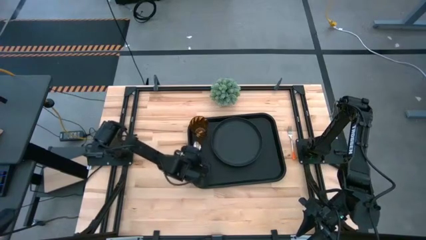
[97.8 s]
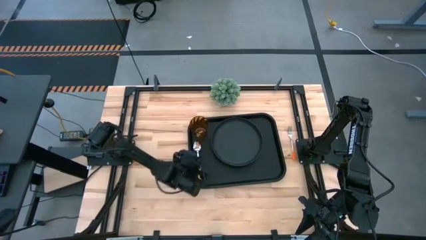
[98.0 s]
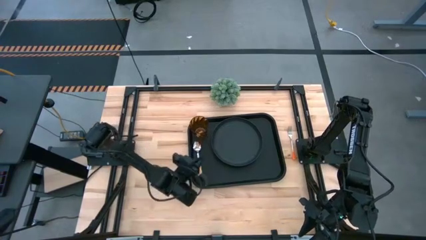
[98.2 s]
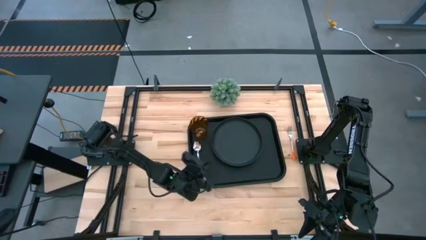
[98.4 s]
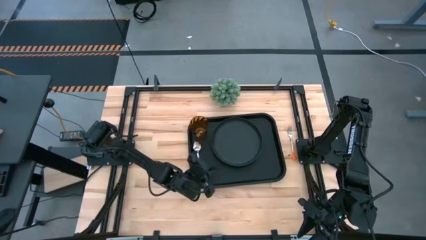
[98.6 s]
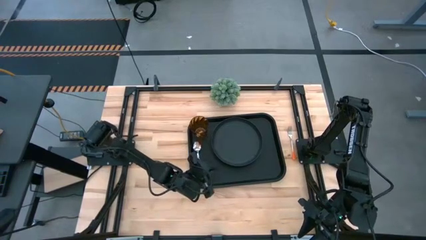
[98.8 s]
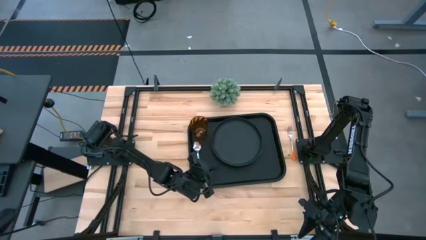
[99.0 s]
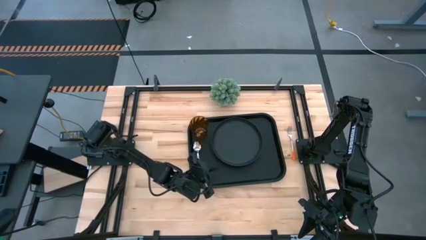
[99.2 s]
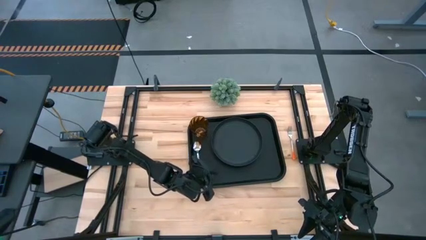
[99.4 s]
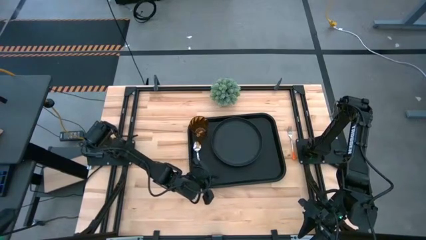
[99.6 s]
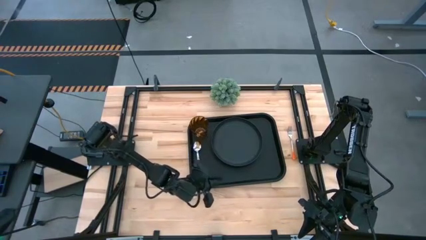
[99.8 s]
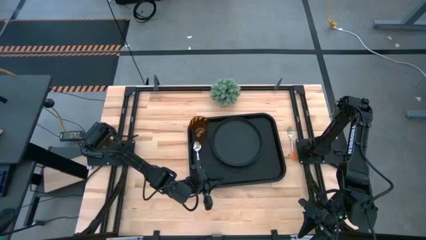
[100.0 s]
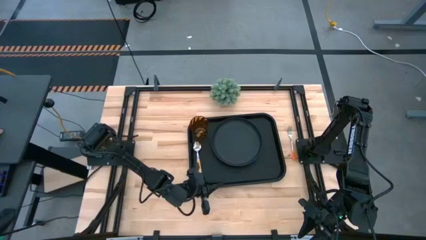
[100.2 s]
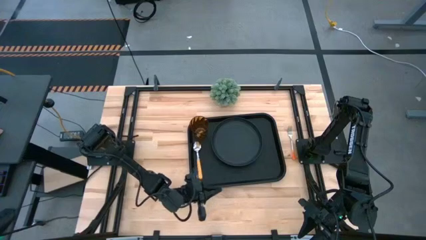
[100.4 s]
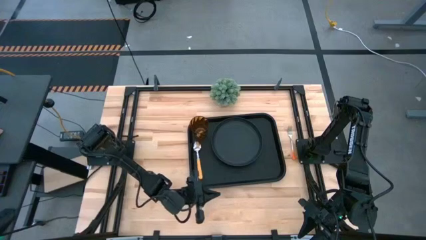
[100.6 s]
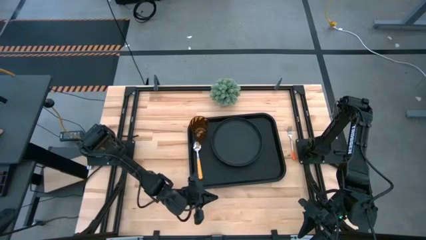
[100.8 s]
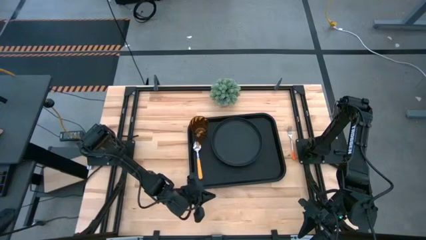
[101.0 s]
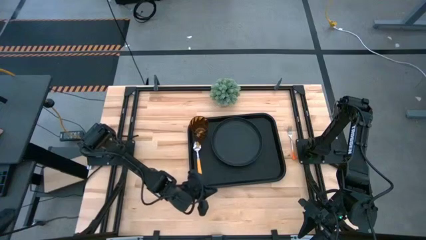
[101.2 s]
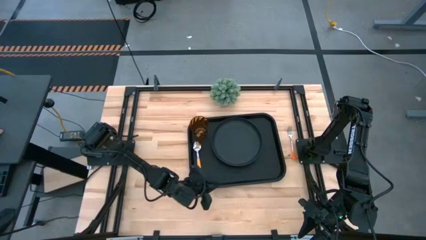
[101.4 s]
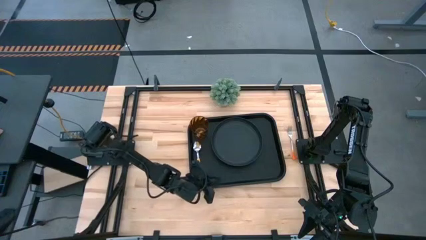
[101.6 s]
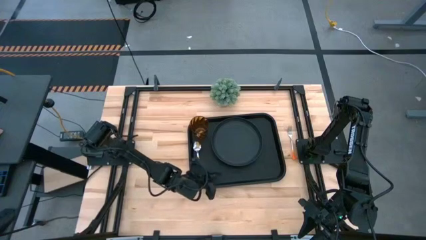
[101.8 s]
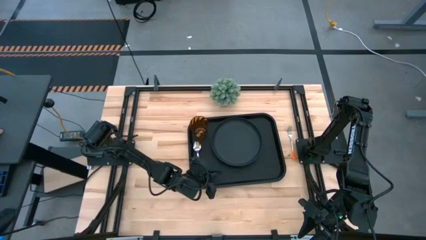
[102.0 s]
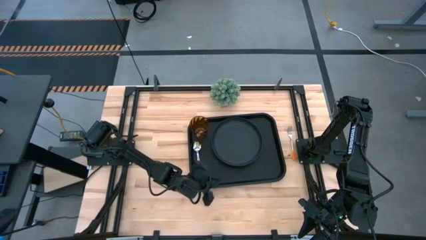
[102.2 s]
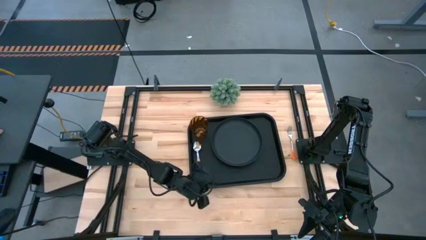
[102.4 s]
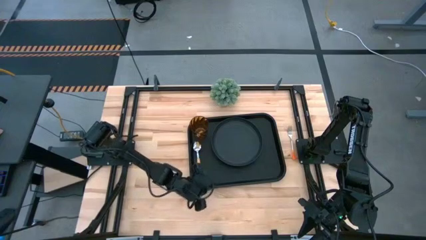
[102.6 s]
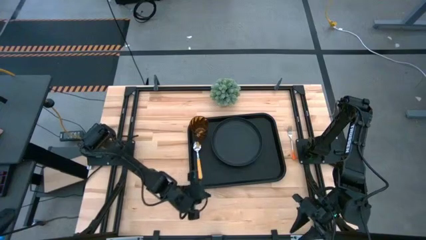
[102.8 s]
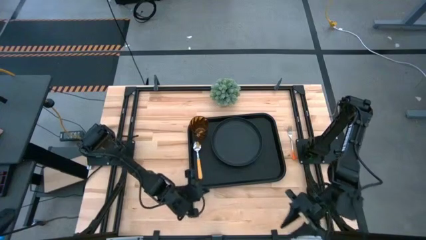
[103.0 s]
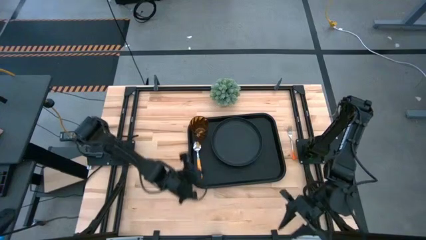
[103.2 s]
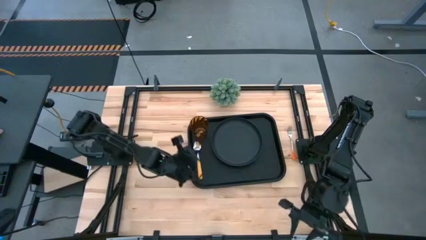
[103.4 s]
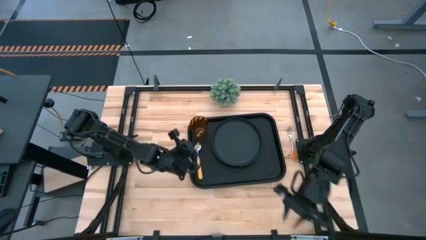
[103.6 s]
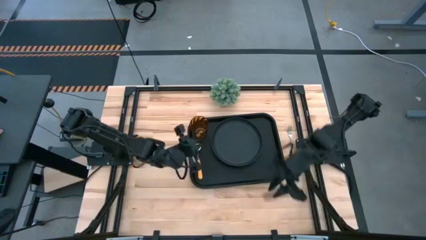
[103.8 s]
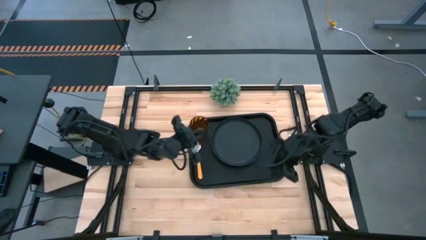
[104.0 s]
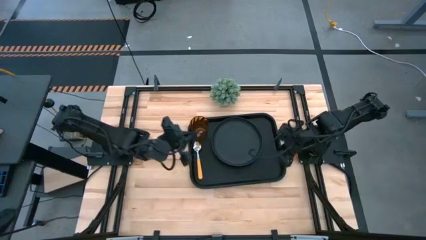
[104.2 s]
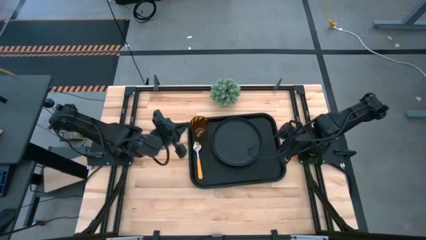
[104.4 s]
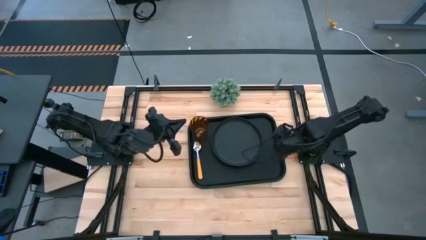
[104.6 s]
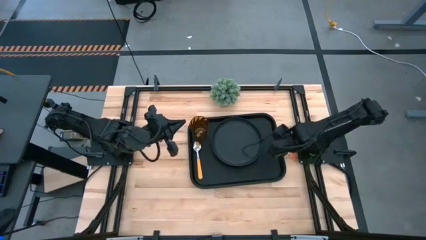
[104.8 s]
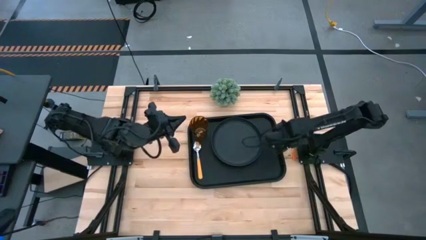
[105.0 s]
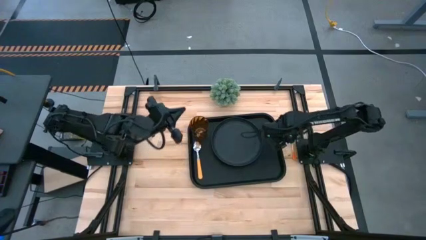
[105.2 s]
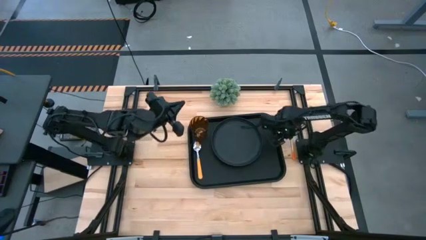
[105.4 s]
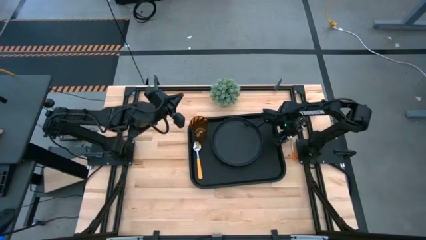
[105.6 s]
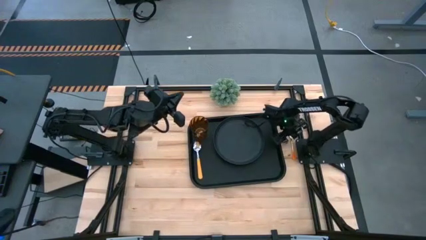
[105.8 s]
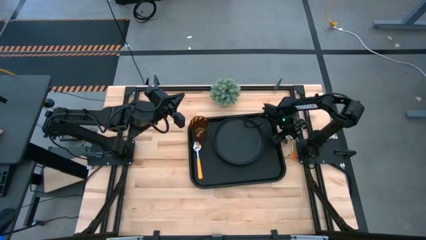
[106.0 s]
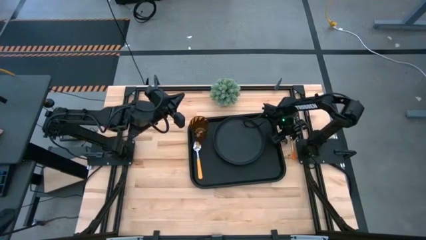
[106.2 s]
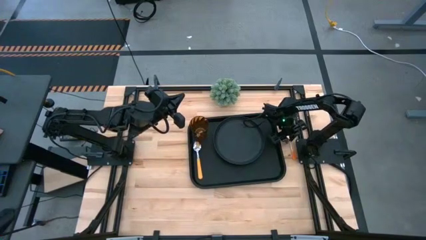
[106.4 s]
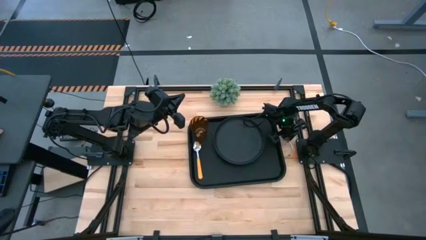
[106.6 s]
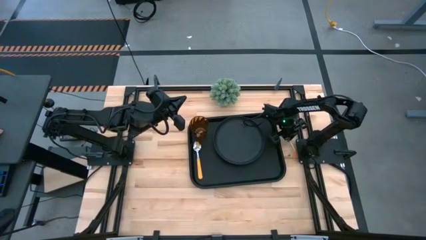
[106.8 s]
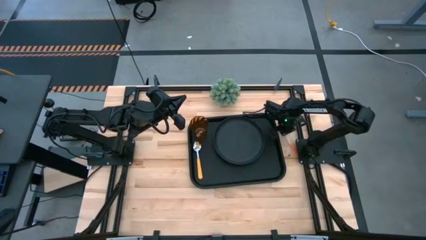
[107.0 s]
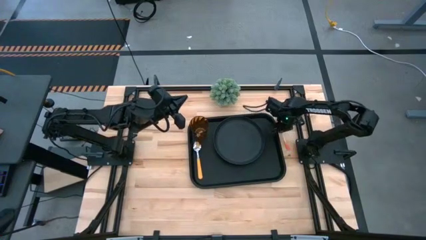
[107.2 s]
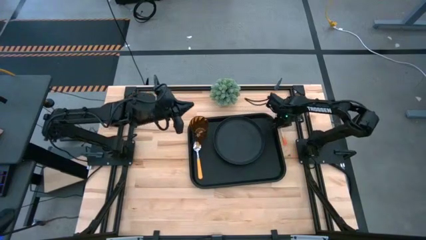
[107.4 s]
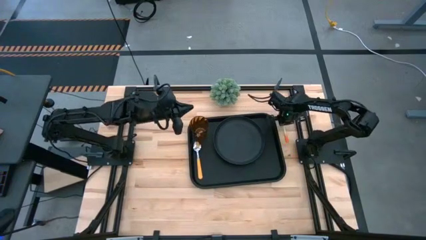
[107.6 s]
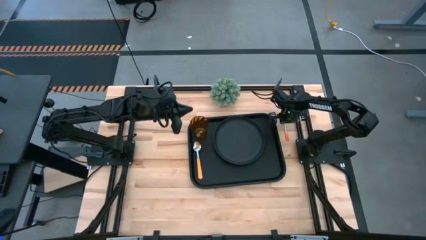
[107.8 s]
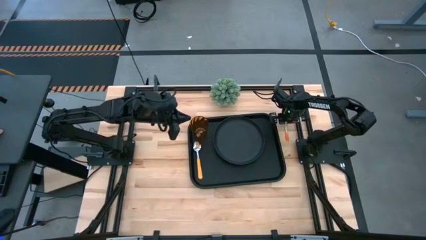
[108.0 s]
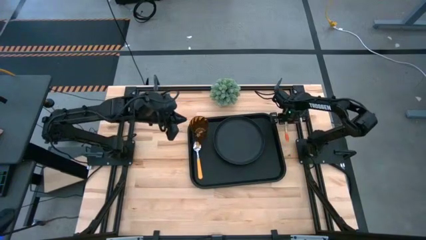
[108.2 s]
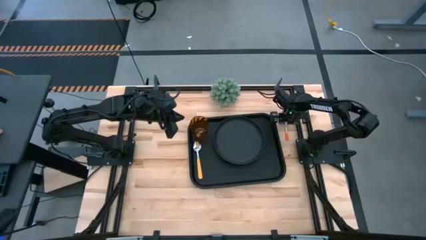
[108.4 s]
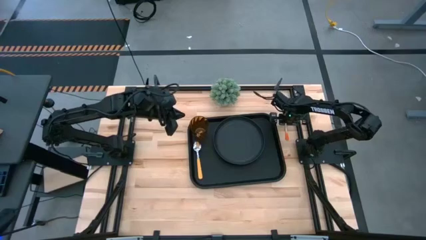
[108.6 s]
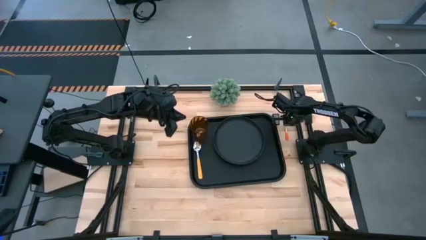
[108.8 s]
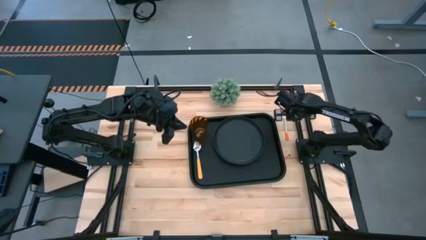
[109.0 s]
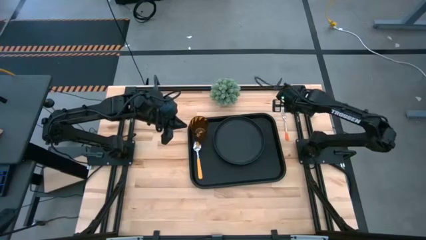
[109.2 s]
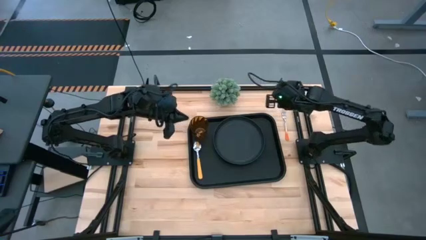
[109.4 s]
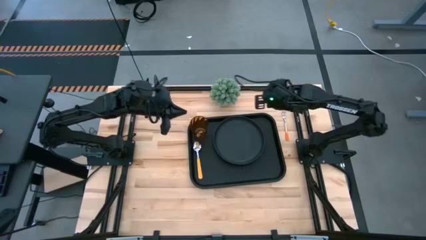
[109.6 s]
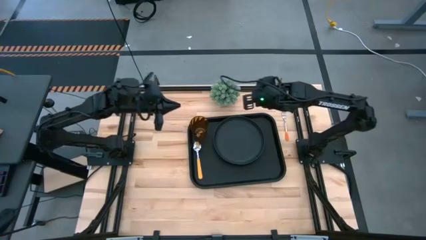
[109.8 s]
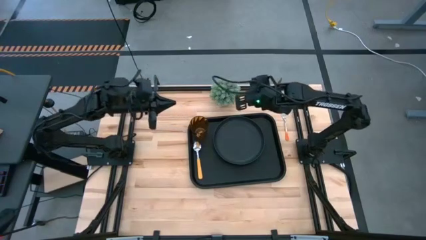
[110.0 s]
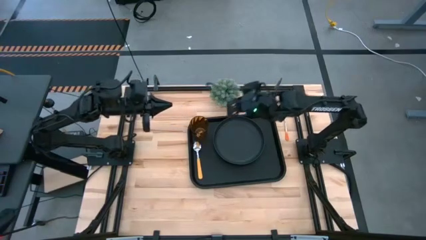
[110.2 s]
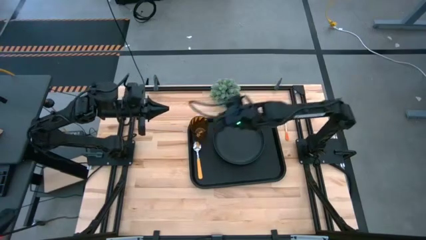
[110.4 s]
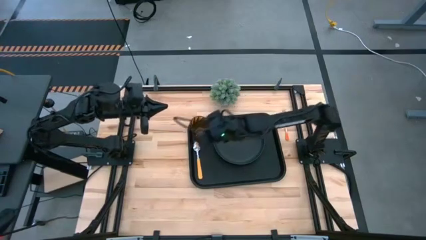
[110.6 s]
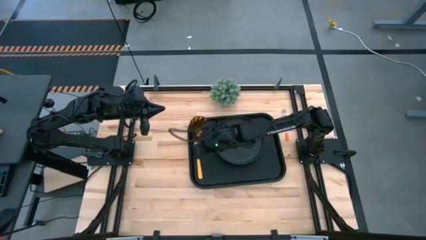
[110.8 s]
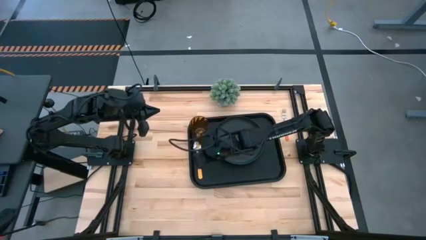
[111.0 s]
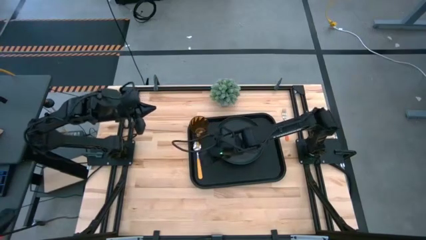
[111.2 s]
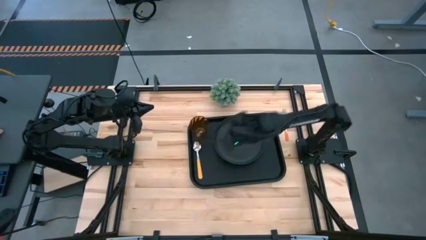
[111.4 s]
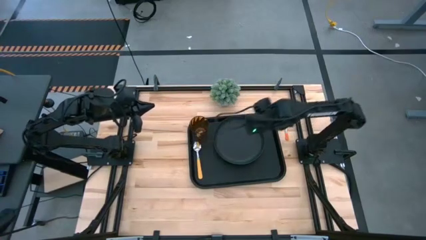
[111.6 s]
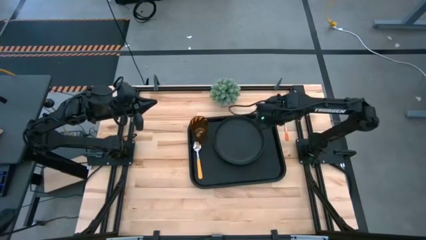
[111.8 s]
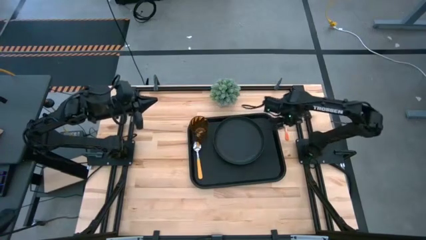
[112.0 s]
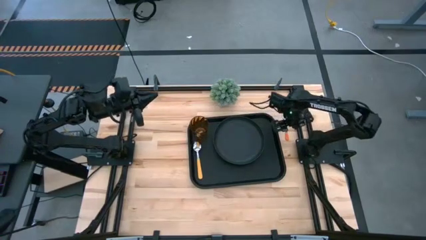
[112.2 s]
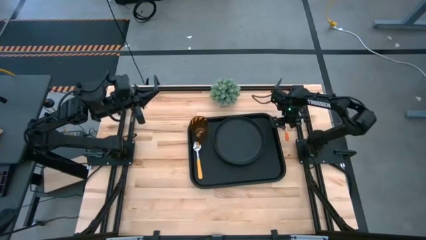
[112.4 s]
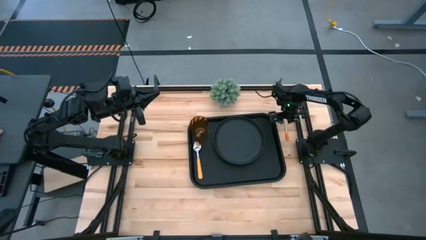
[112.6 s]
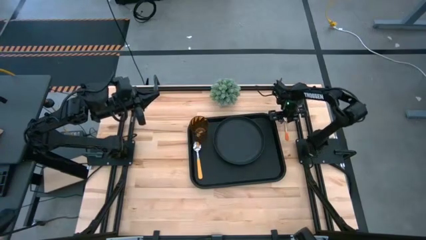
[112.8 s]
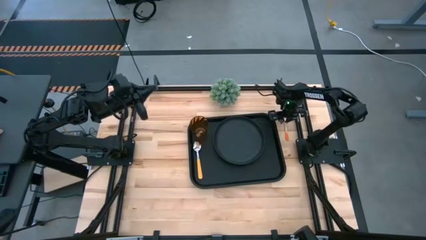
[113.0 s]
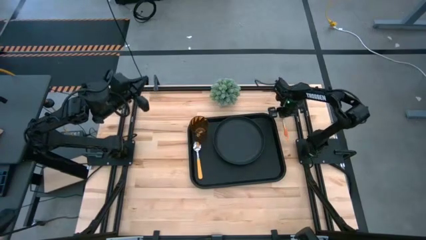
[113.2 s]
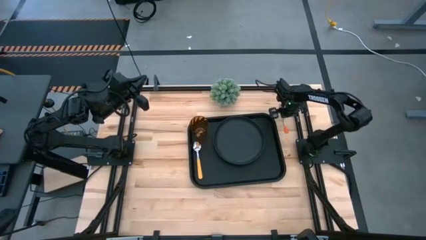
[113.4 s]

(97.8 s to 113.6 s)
Task: Pick and place plate/cup/fork/spoon on tray
Put the orange fork on the black serving tray between the orange spoon and the black plate

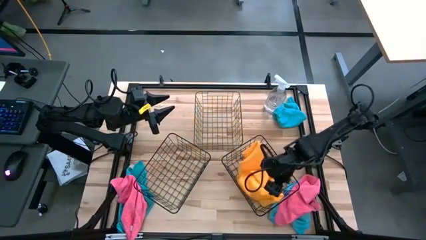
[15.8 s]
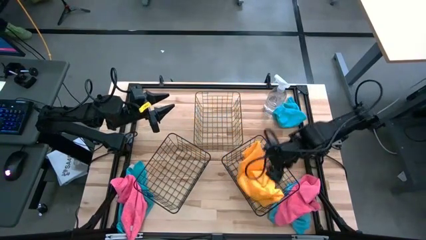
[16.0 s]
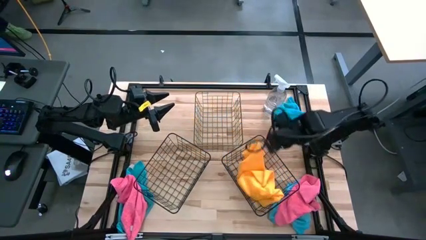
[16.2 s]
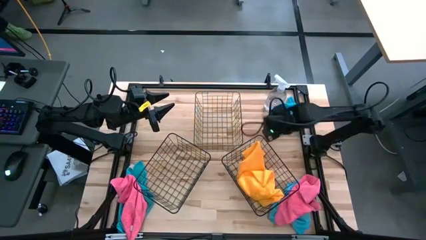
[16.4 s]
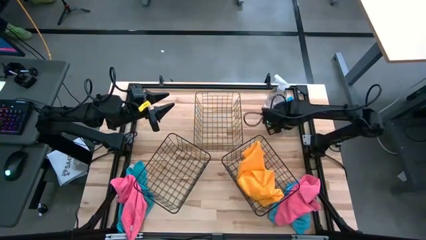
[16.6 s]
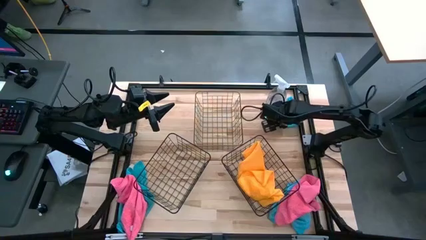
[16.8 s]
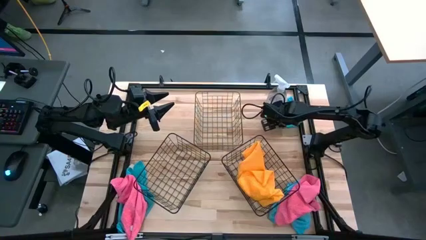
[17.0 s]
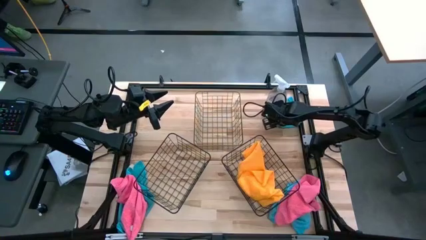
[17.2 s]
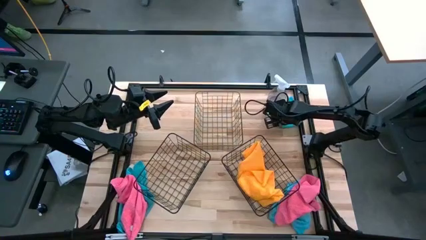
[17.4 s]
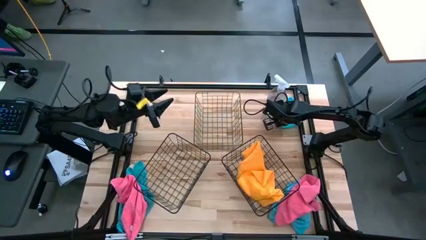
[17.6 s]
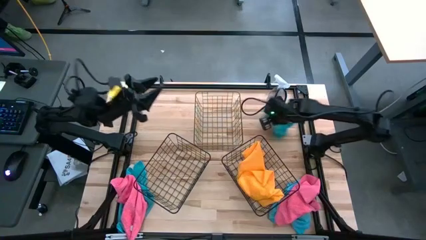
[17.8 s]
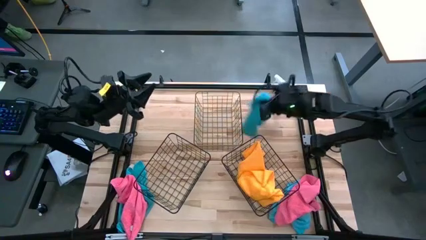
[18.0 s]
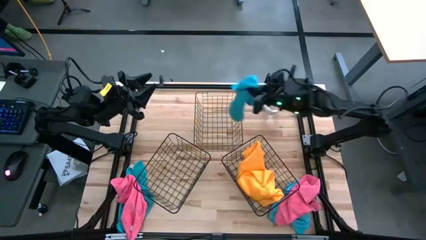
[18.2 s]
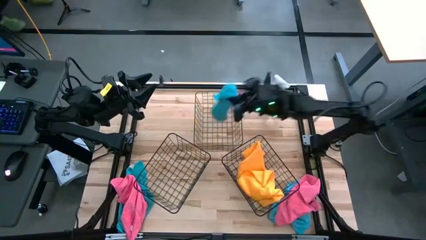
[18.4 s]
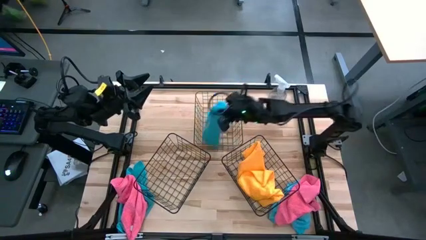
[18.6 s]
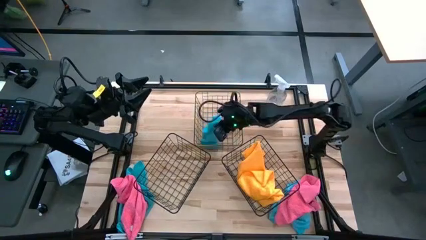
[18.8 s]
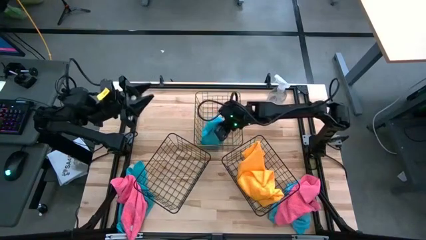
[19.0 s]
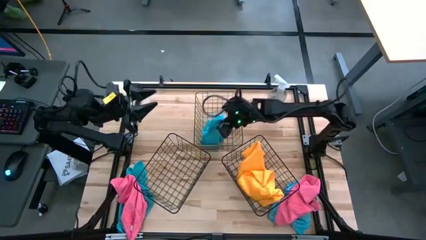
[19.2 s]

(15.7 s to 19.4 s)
Task: Sort microfiber towel by color & place in baskets
Put the top right blue microfiber cloth into the top wire basket
